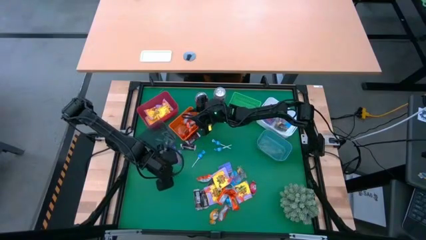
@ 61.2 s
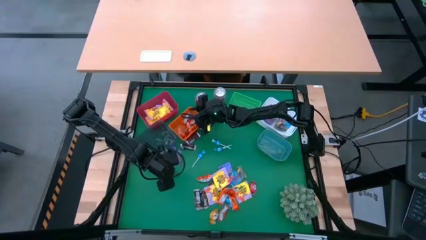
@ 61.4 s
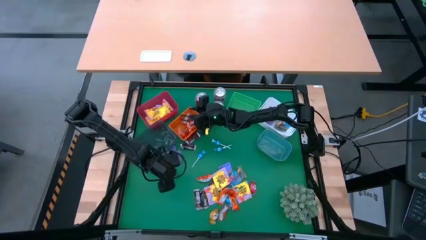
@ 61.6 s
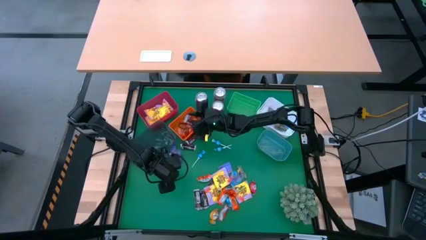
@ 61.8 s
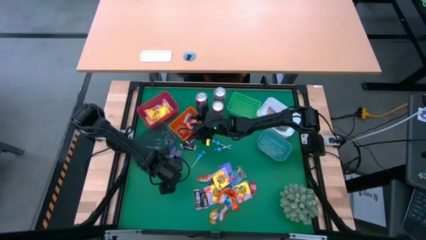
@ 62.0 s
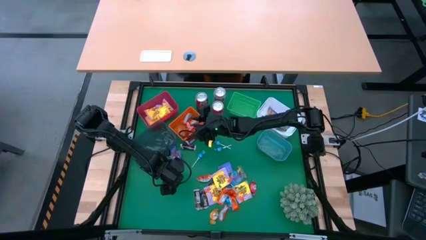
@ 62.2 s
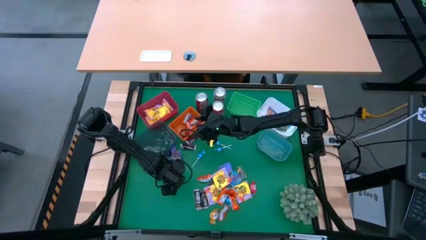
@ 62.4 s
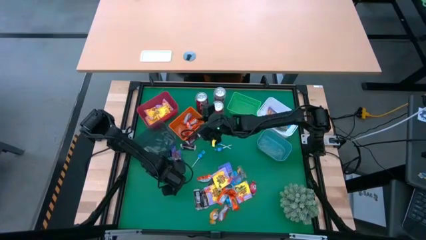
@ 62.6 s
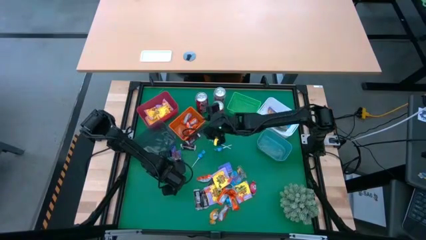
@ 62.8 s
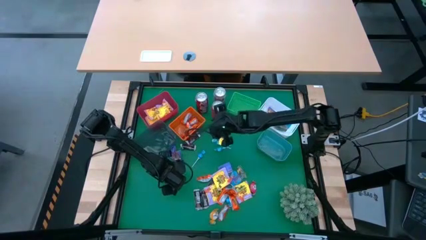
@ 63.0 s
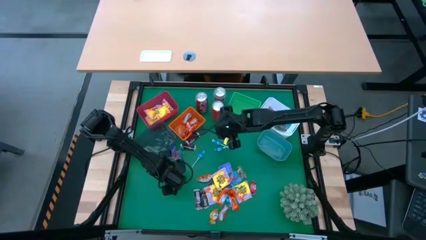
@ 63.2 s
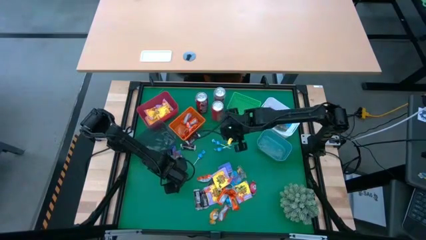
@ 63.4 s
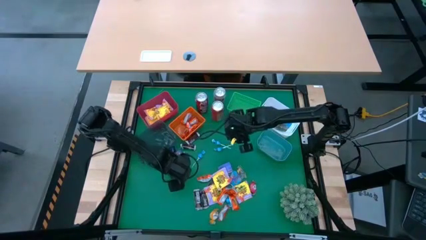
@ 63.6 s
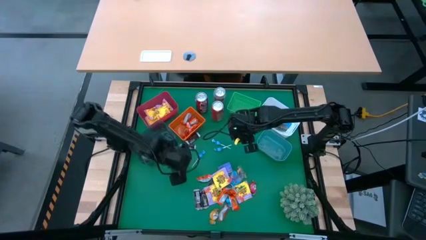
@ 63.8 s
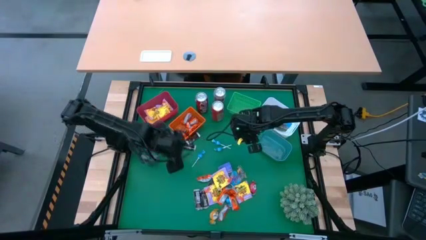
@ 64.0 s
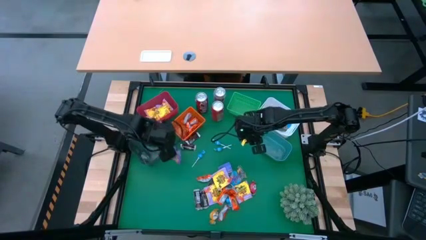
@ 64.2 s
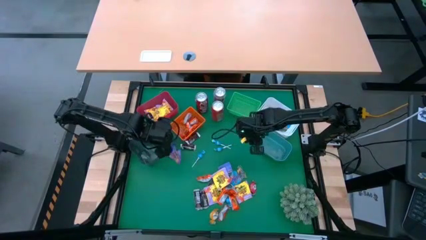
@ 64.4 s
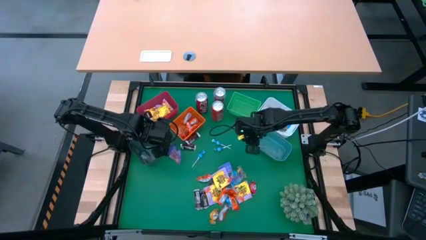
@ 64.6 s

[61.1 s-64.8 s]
Task: Sort candy
Put the red candy into the black bin

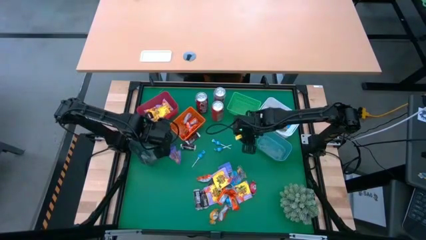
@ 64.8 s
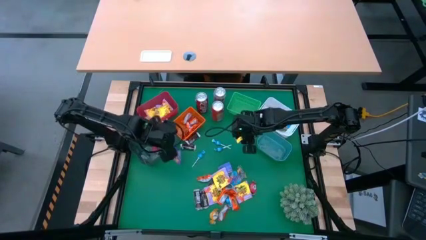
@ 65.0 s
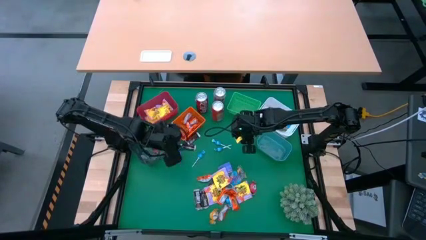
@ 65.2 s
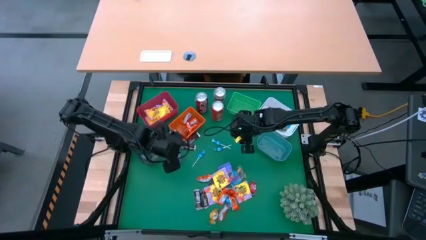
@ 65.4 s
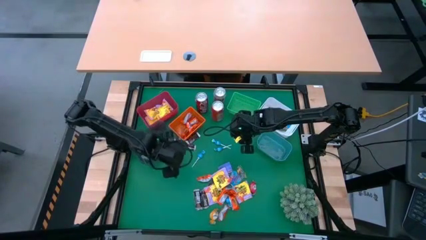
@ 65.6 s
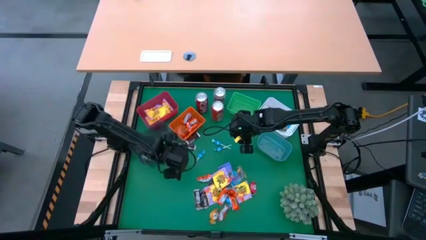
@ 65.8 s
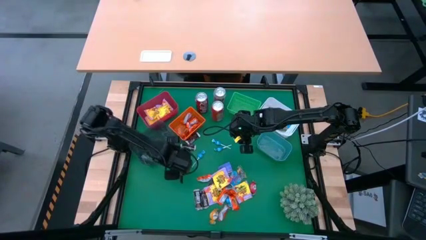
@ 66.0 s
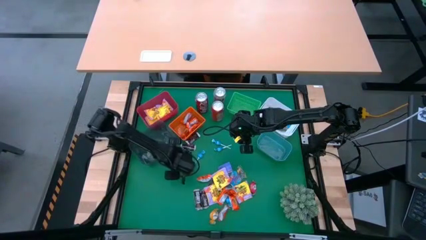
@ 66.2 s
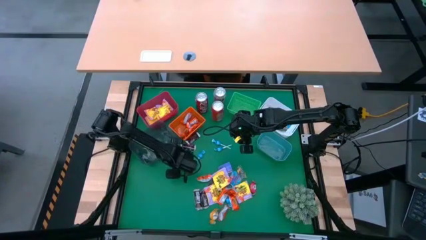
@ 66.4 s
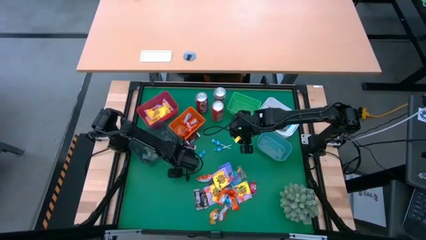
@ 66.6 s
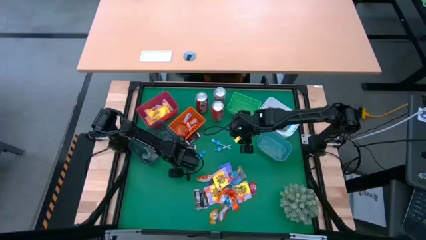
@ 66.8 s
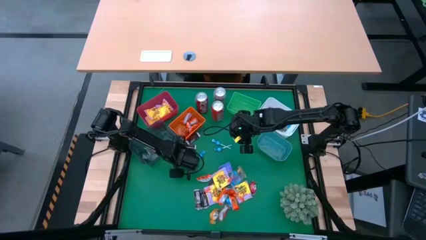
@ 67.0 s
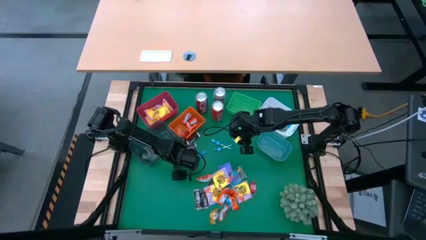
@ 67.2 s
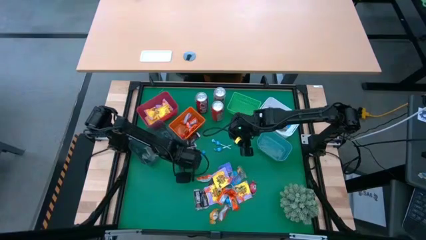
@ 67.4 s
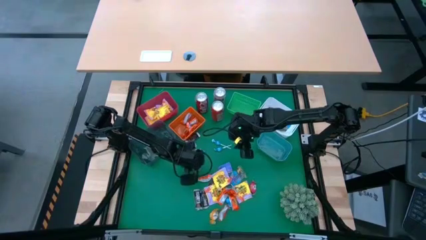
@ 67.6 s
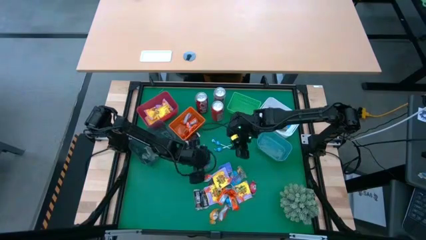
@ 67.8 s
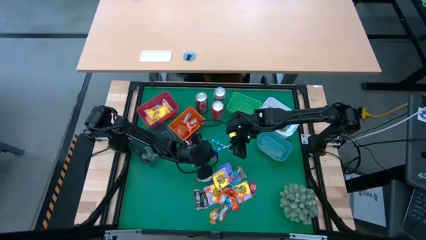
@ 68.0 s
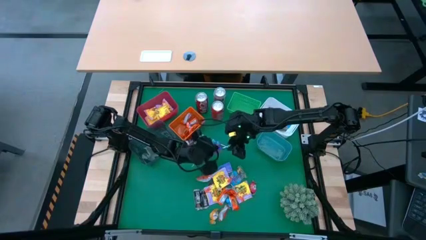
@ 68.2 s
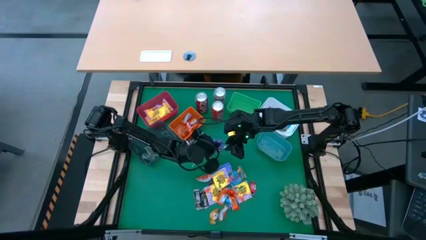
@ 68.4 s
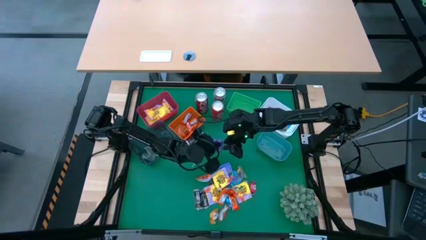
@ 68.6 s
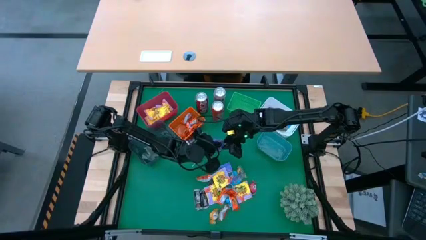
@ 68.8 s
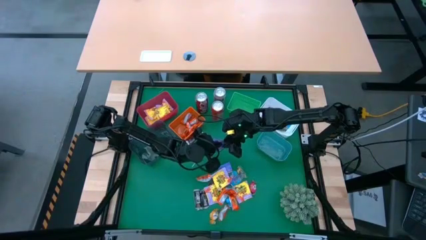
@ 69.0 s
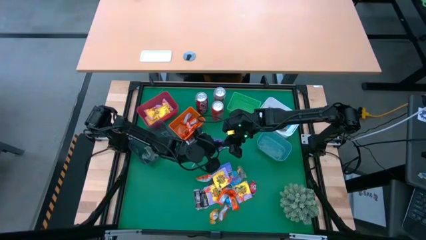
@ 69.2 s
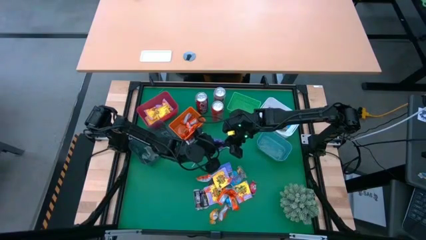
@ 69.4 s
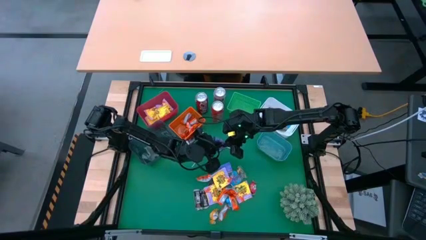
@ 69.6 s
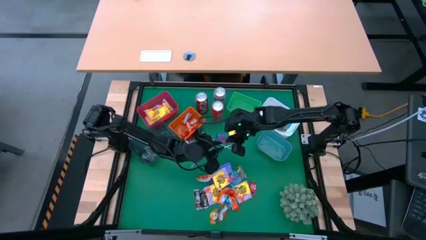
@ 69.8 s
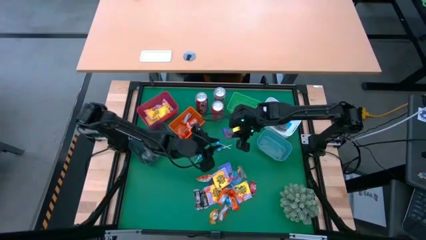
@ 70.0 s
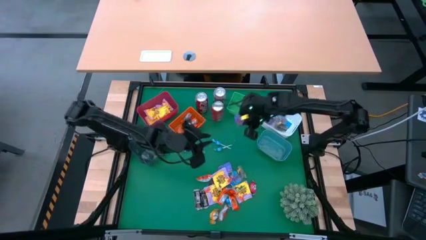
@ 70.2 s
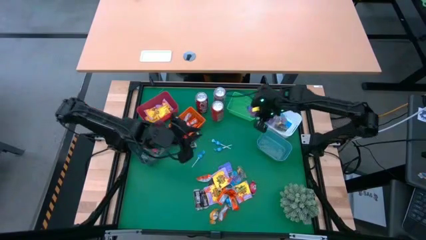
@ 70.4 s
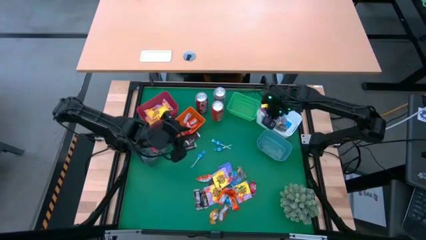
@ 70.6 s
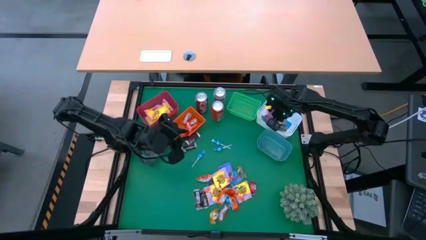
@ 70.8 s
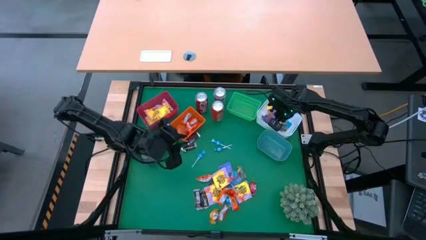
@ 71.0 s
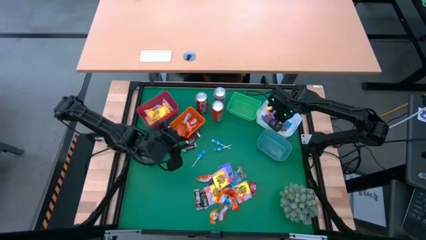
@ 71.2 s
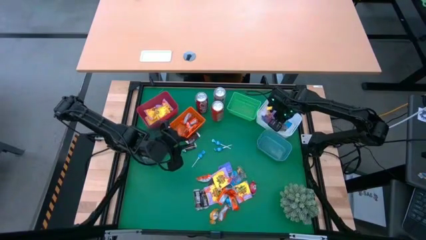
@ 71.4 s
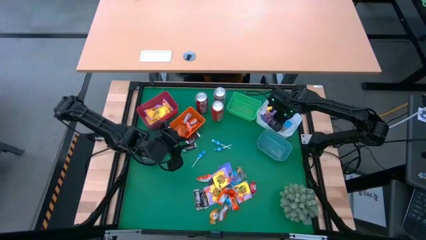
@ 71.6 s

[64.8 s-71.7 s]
Put the violet gummy into the white bin

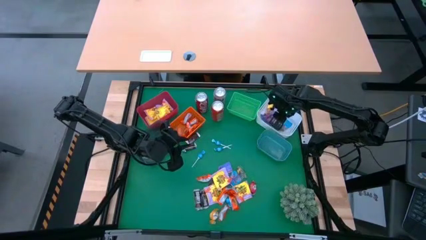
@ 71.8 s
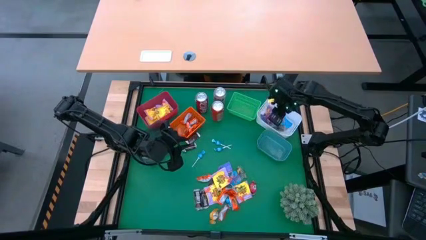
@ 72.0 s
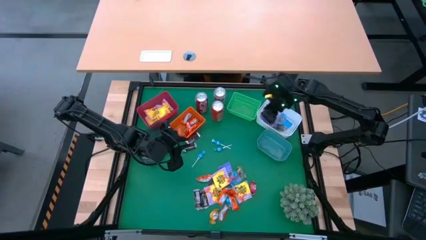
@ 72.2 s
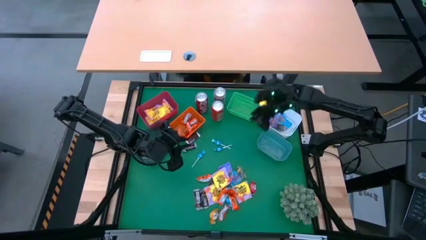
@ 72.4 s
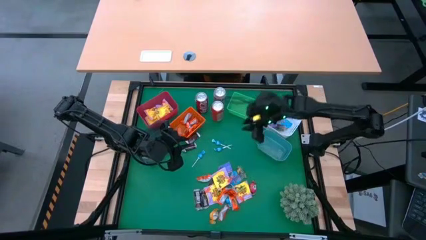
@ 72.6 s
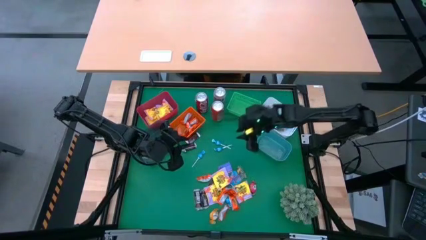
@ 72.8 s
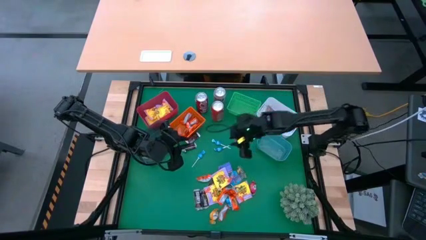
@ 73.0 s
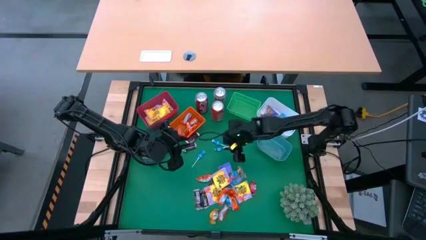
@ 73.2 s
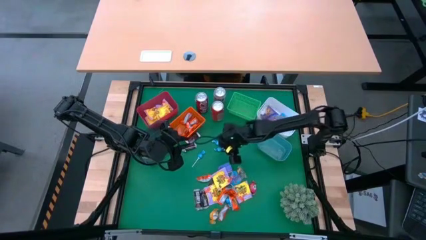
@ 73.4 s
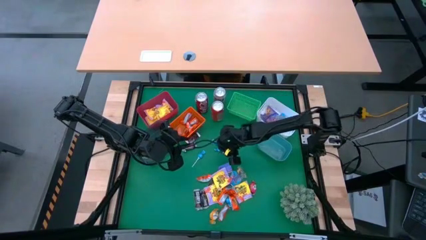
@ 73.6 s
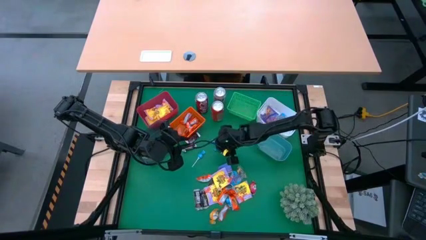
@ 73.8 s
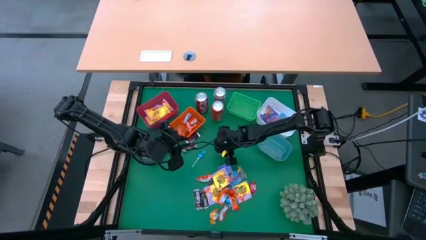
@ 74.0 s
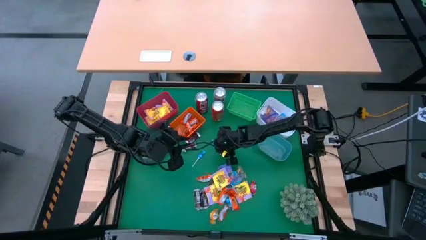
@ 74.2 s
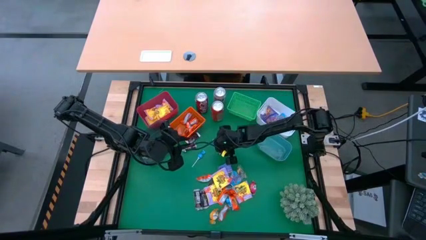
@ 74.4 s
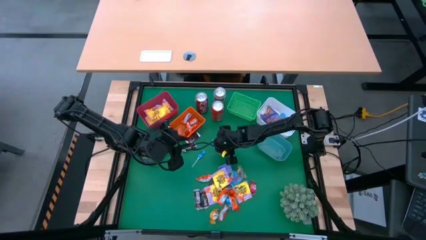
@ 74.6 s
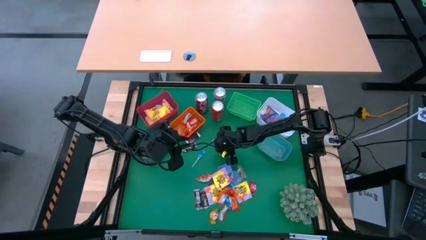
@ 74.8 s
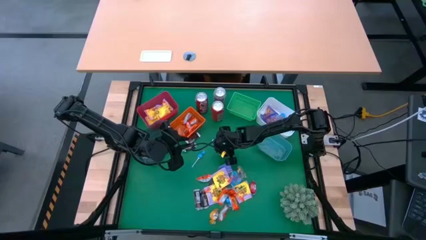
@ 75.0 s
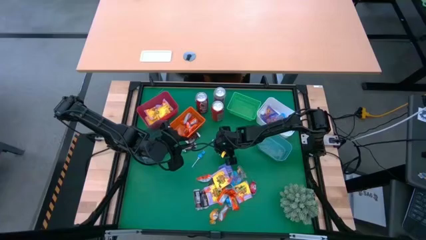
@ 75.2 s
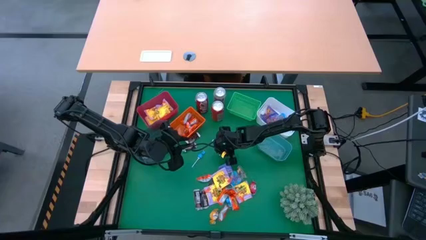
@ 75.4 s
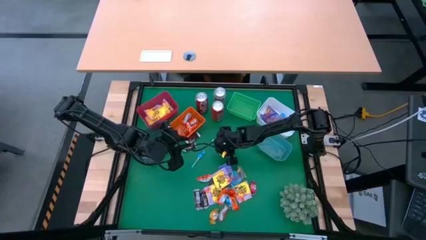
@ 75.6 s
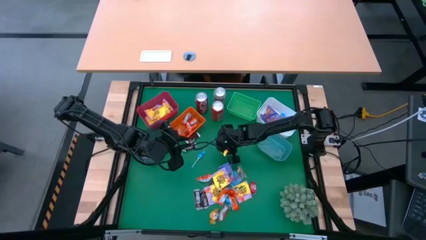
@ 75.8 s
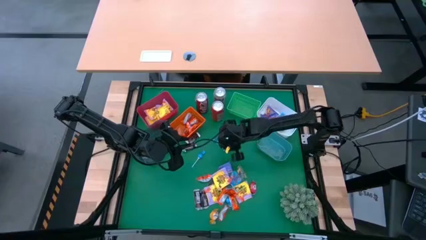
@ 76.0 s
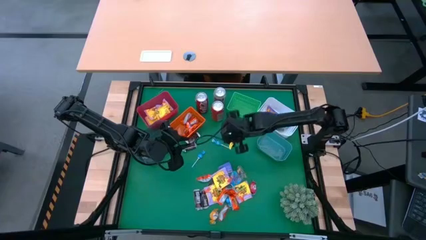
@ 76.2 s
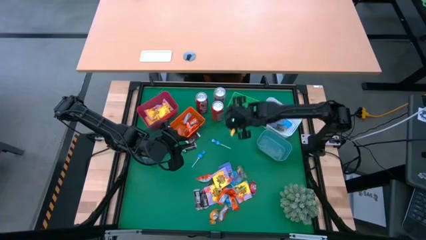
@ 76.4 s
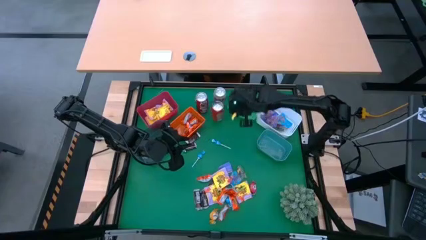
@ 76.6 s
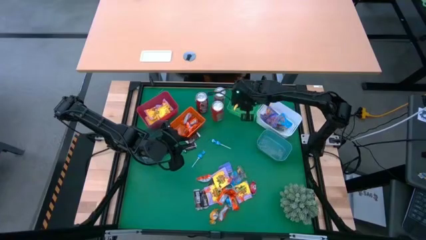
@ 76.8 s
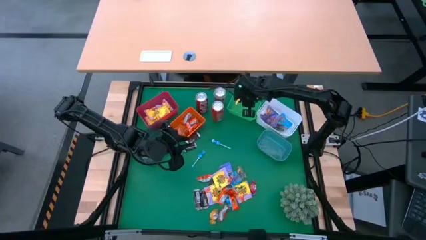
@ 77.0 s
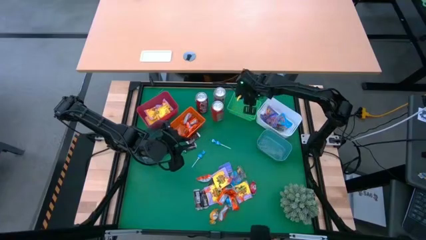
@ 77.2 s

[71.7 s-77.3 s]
Put the blue candy into the green bin
